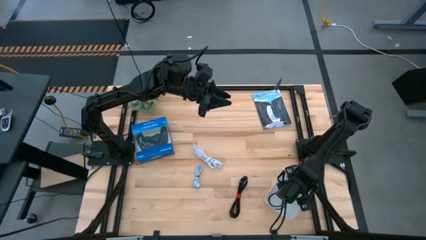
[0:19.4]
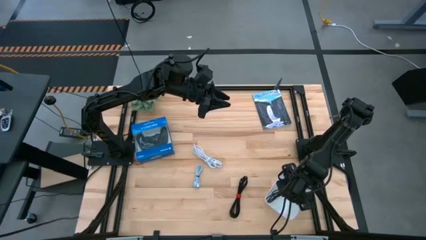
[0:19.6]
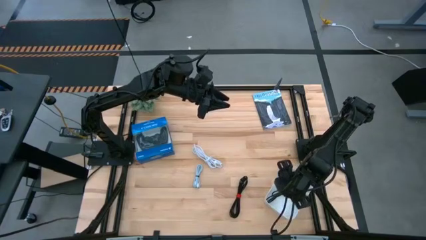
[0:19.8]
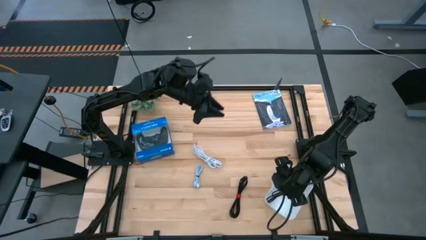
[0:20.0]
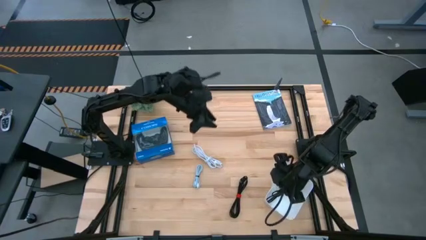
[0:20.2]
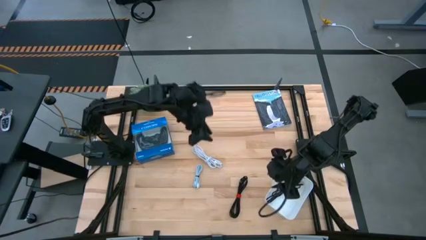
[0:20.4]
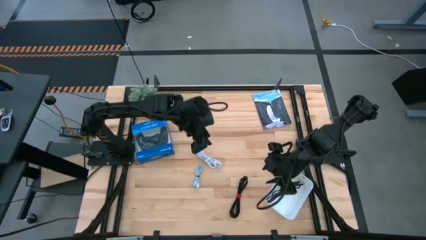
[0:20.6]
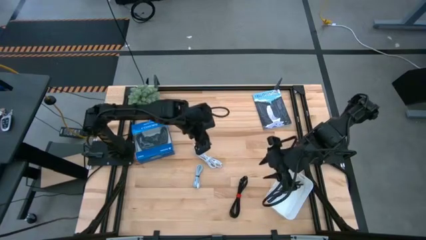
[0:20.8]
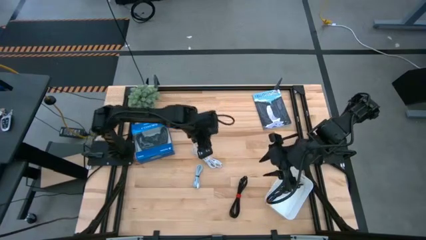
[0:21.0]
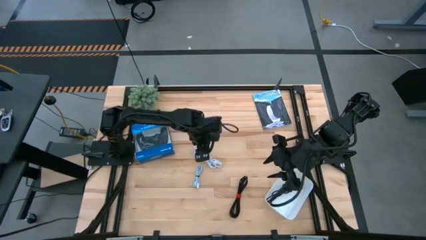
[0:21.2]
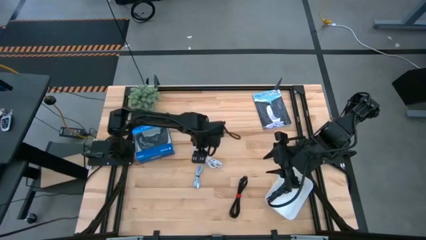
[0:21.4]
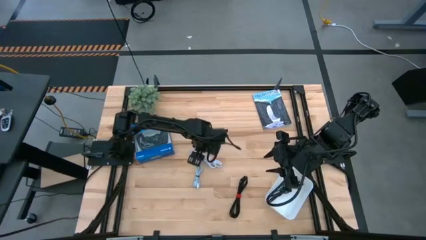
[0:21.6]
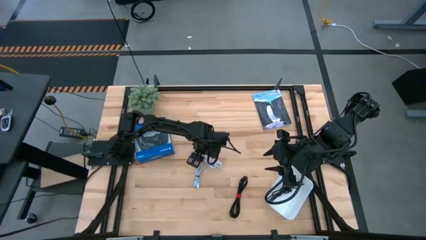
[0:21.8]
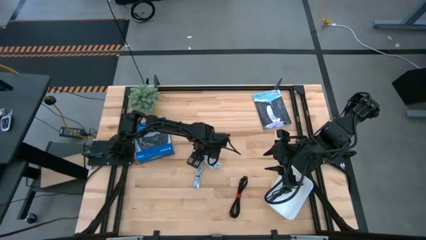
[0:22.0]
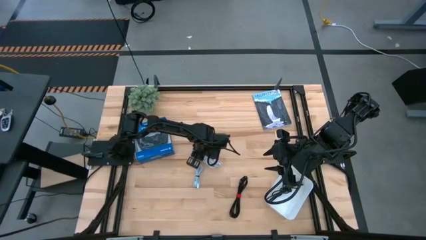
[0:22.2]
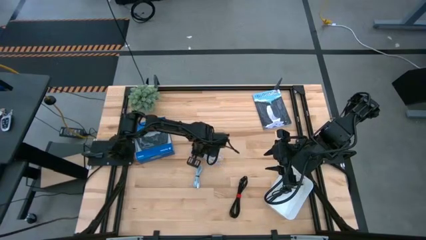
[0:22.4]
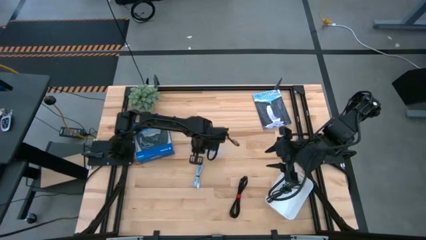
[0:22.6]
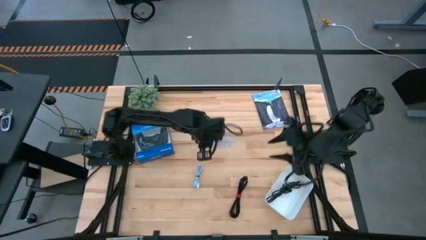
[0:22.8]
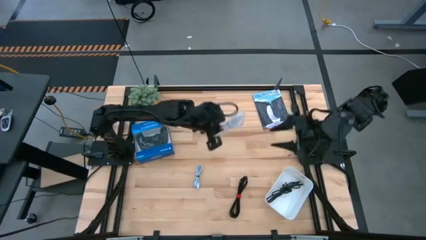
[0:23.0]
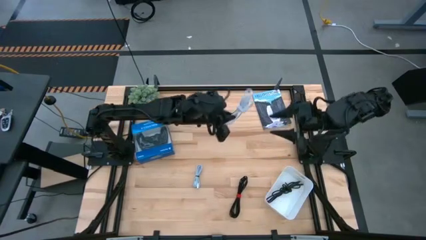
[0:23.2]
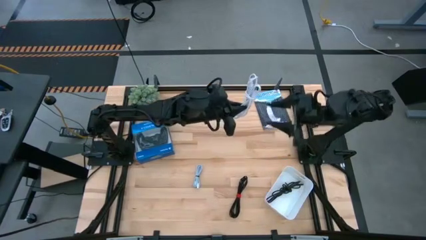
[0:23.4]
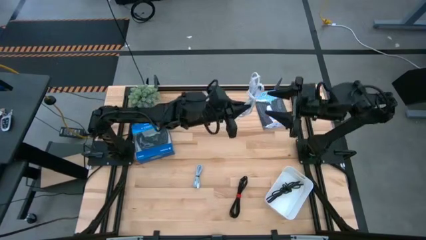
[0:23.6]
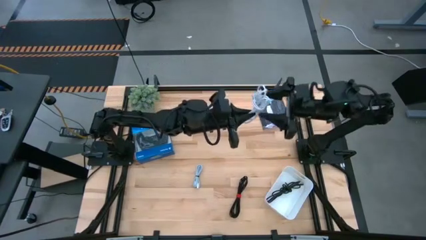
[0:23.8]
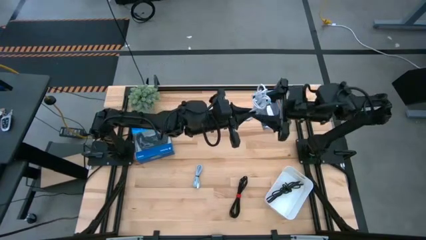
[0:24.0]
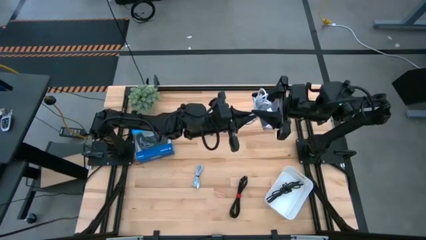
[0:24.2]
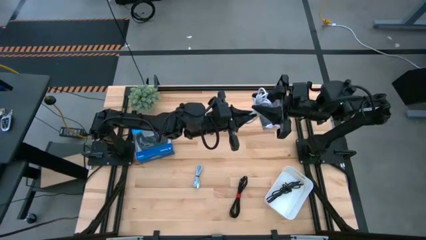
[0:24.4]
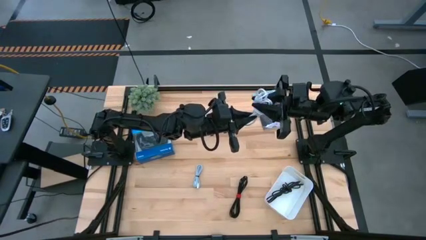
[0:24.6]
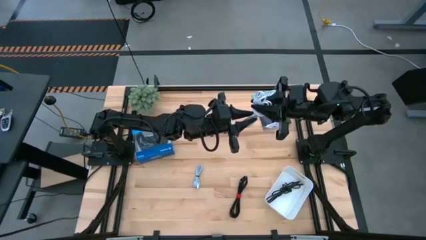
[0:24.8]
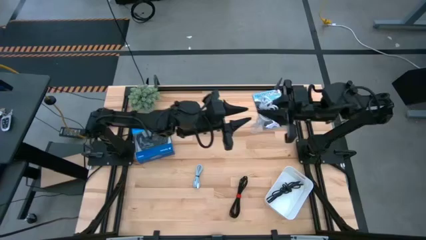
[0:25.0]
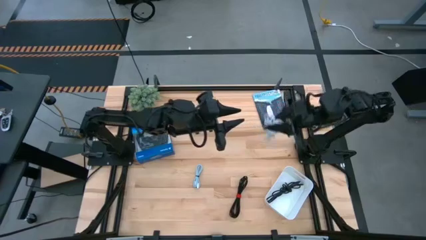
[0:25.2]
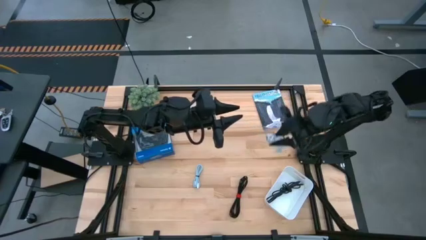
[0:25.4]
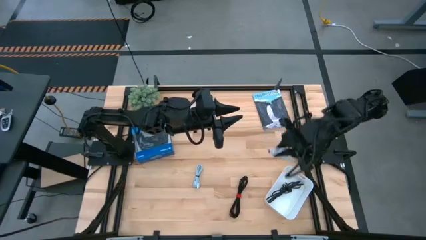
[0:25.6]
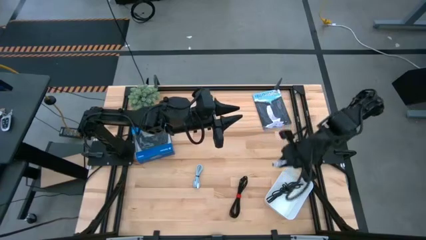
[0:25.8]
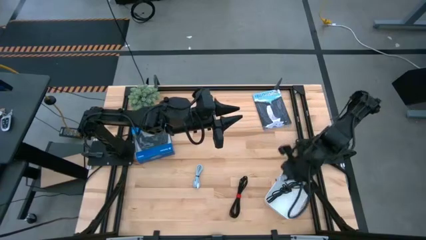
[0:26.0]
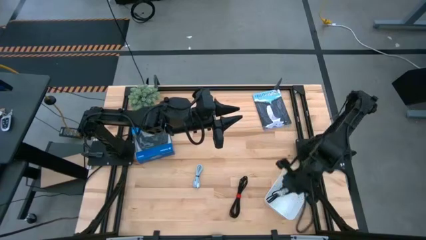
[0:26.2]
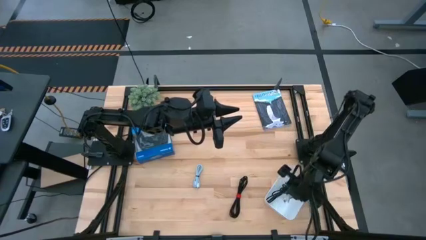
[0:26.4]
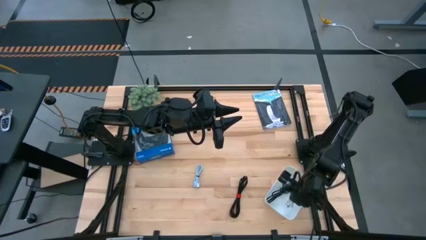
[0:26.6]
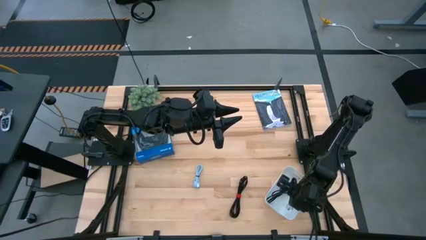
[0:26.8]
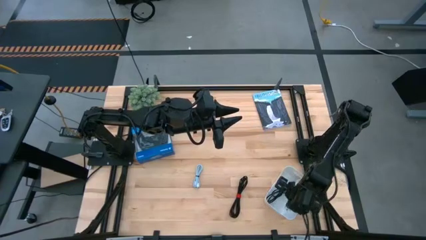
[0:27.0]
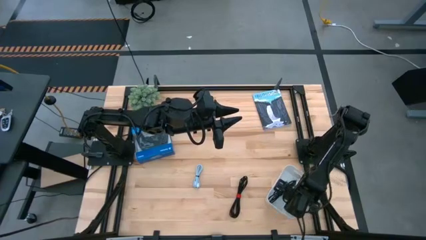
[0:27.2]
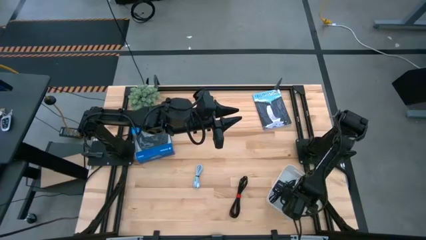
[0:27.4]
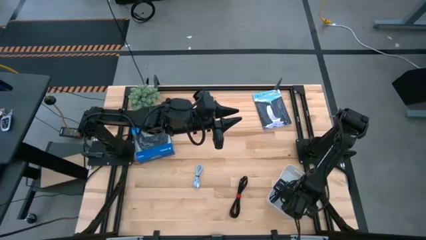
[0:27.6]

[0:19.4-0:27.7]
Task: Pick and place USB-C Cables
Put the white charger cable into the white bin

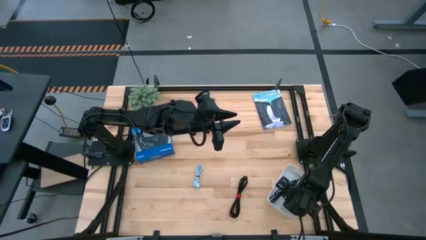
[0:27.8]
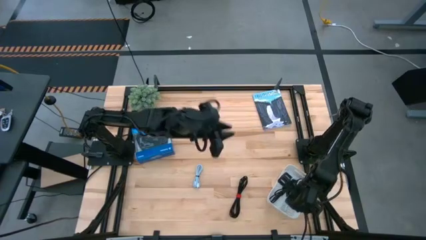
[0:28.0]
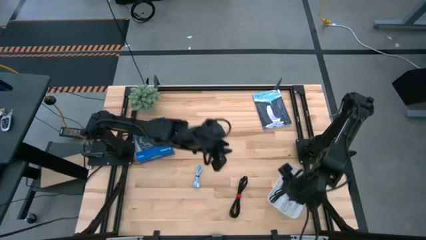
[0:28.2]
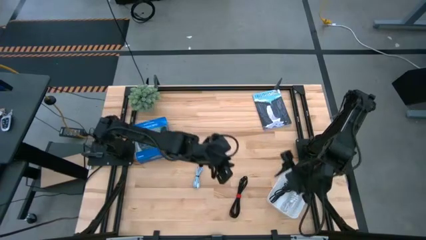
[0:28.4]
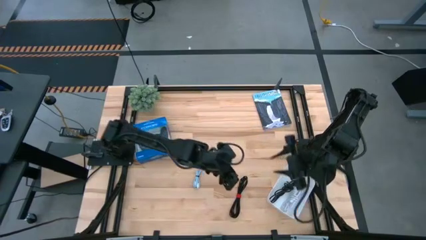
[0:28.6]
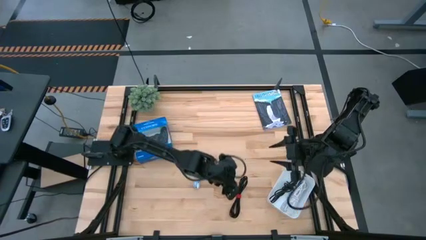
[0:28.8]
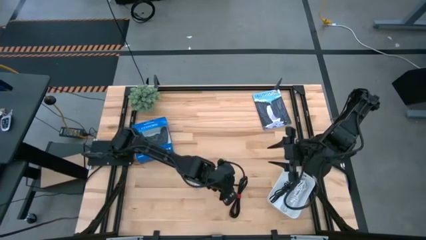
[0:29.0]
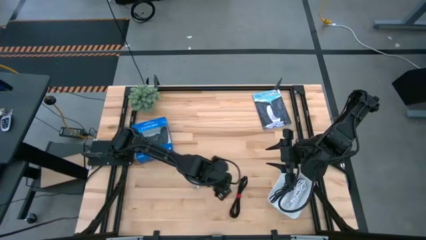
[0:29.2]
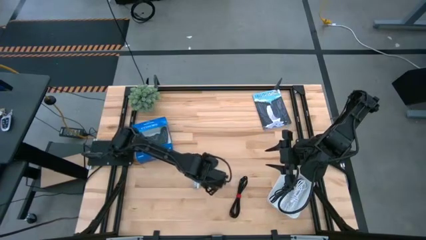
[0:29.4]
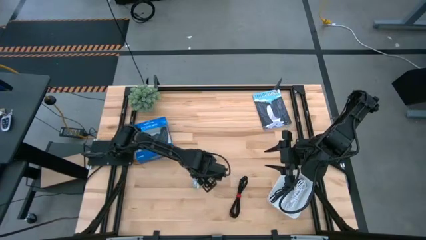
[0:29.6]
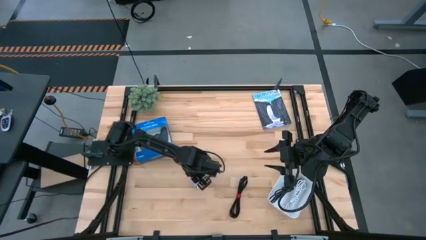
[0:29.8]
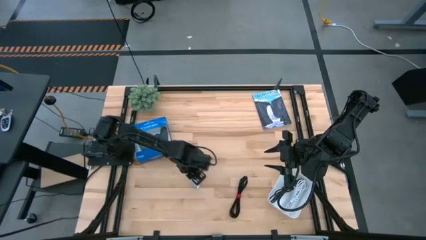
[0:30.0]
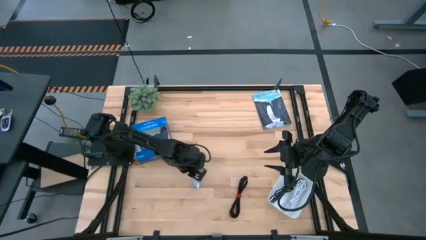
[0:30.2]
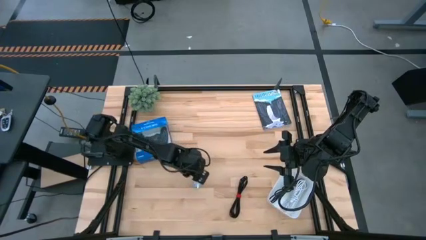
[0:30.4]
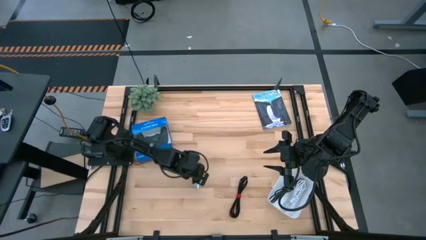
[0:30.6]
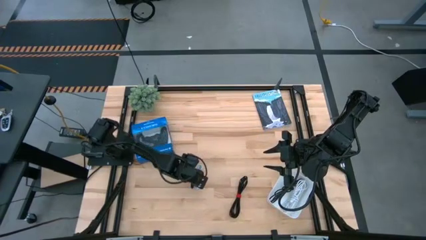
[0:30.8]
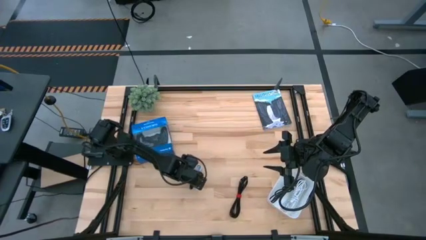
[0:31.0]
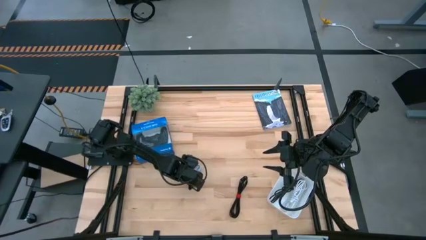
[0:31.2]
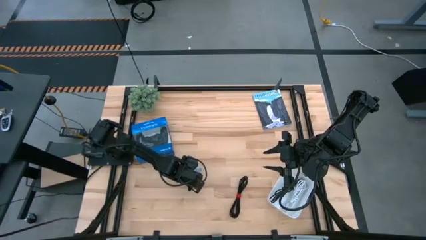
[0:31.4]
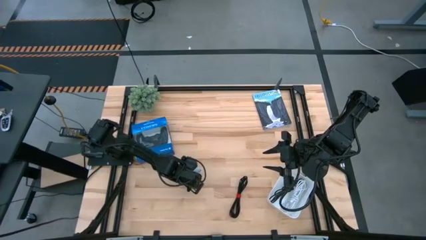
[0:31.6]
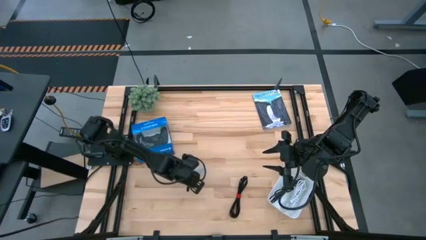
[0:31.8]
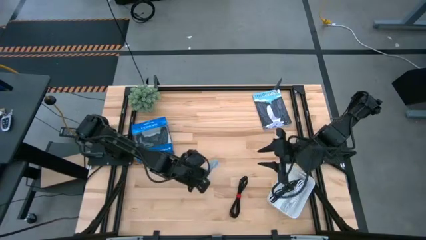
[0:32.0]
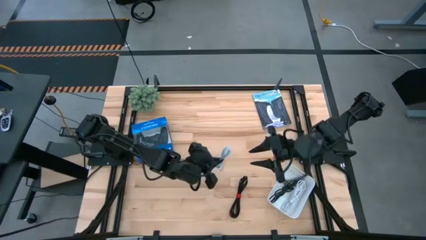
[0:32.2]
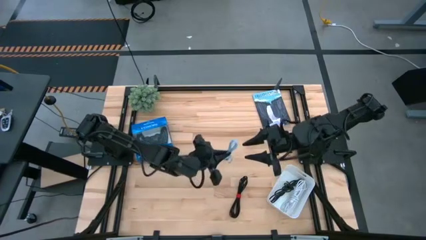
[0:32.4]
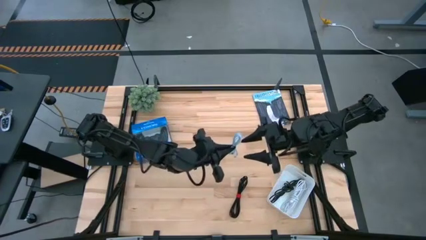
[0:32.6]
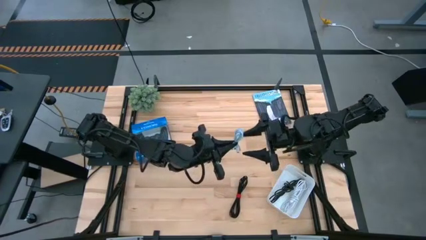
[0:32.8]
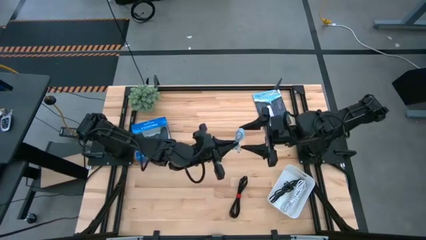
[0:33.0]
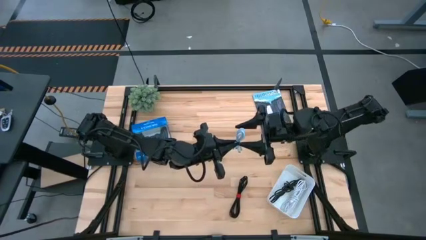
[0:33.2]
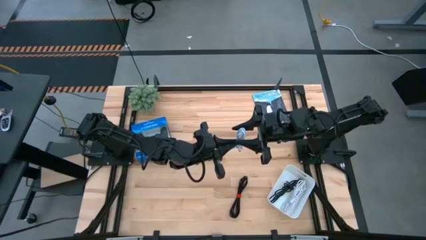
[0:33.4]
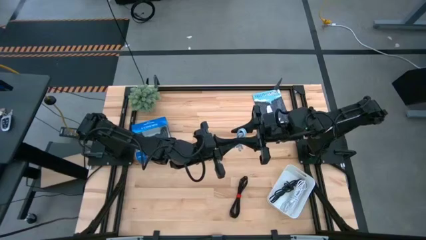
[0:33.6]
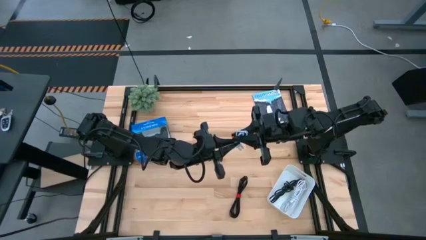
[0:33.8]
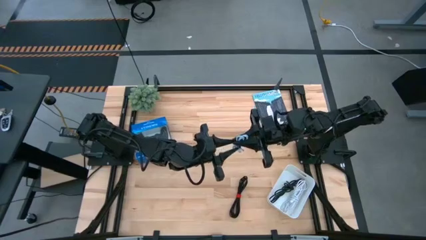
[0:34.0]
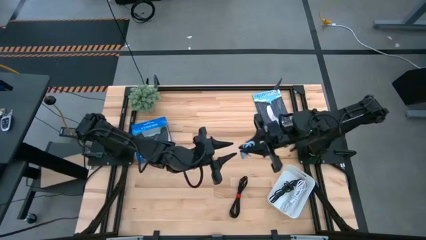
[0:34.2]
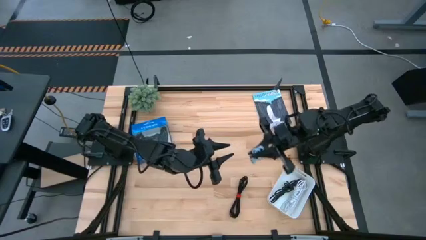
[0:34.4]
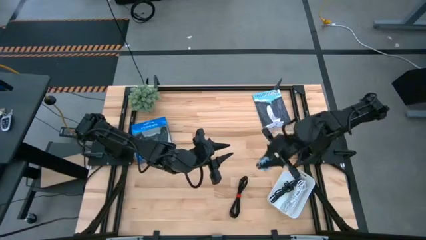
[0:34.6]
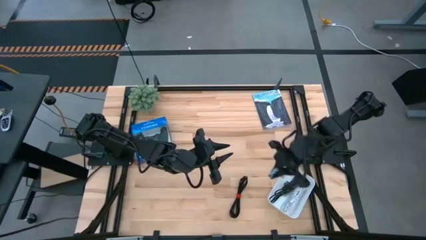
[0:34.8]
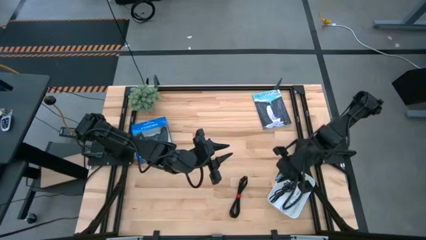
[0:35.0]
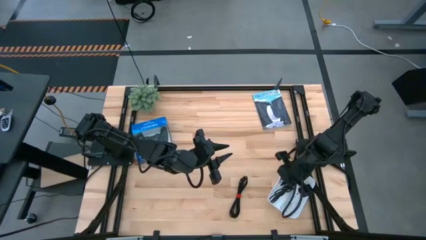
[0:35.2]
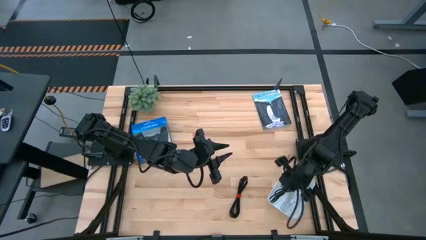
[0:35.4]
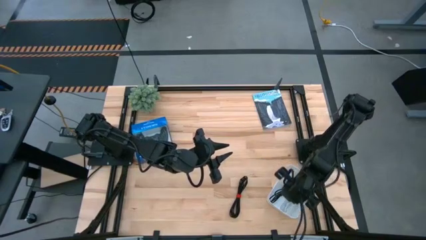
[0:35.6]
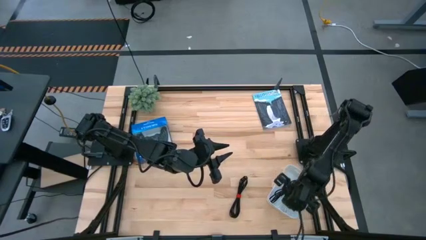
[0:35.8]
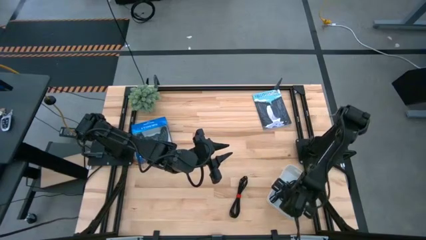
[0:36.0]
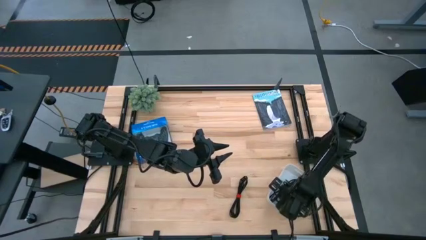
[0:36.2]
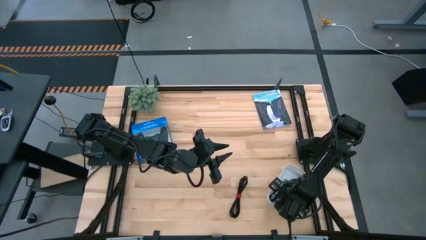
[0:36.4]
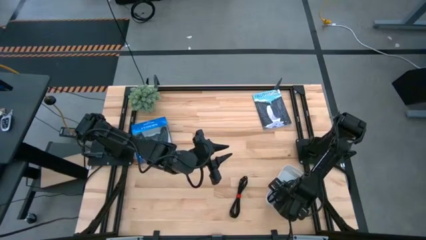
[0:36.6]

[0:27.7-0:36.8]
Put the blue charger cable into the white bin
